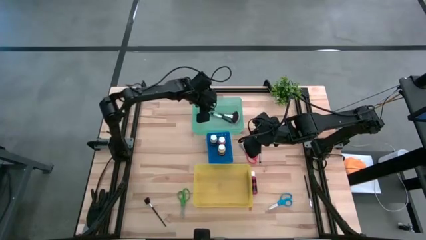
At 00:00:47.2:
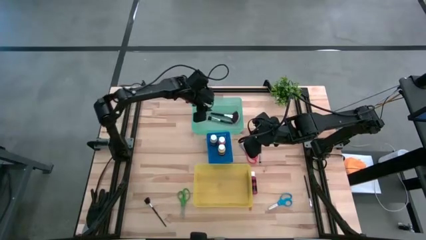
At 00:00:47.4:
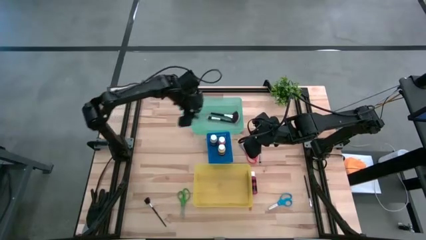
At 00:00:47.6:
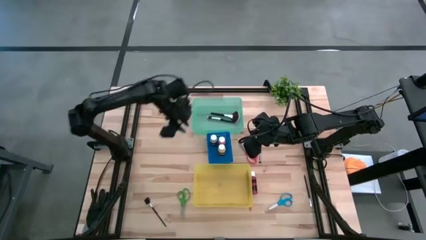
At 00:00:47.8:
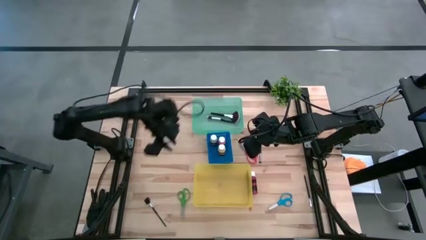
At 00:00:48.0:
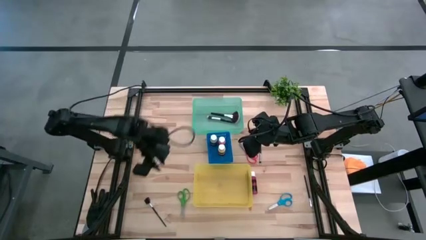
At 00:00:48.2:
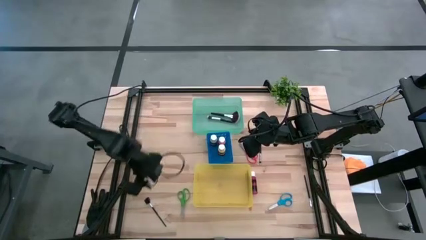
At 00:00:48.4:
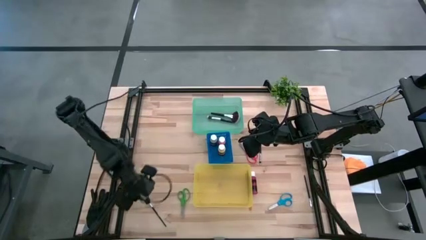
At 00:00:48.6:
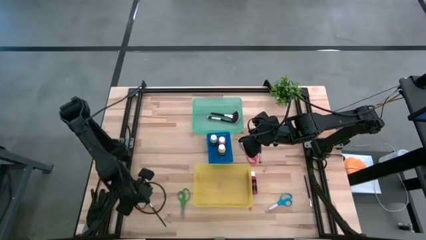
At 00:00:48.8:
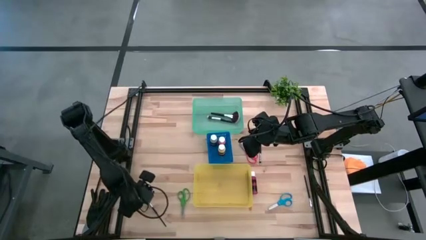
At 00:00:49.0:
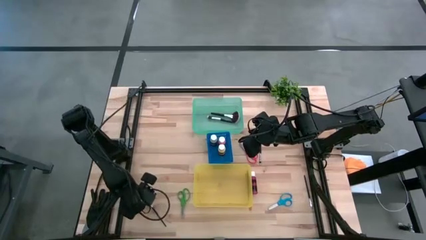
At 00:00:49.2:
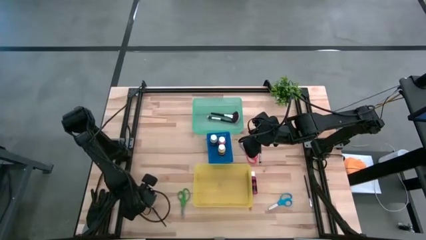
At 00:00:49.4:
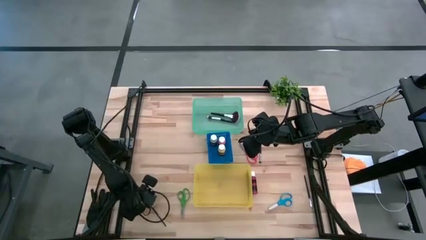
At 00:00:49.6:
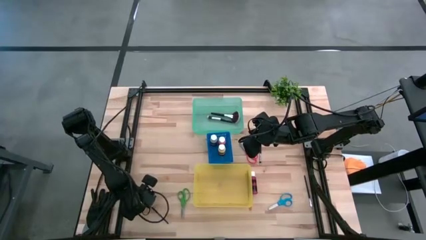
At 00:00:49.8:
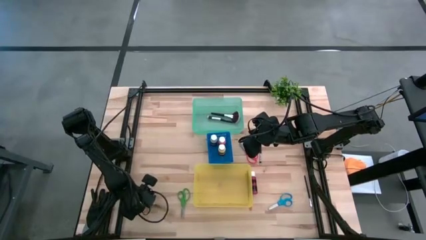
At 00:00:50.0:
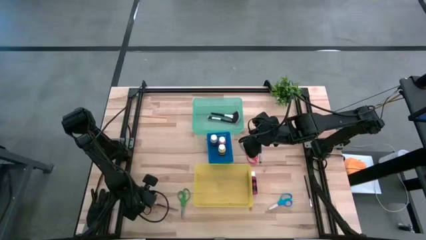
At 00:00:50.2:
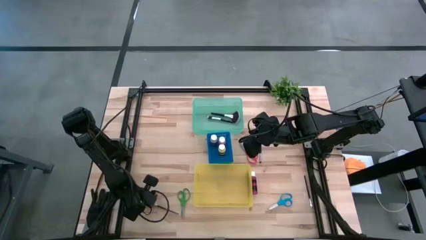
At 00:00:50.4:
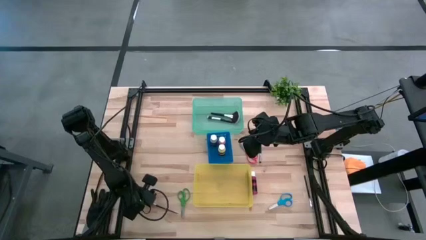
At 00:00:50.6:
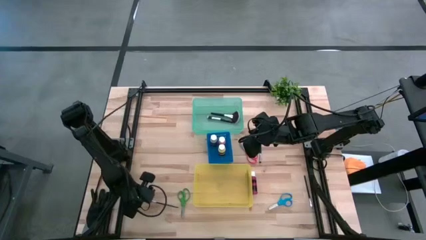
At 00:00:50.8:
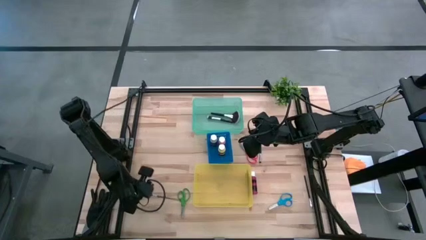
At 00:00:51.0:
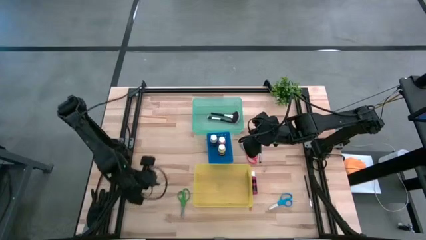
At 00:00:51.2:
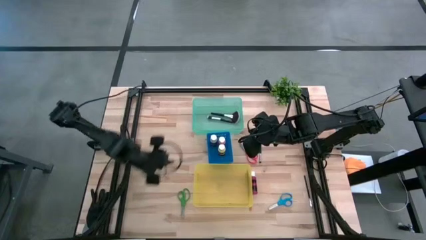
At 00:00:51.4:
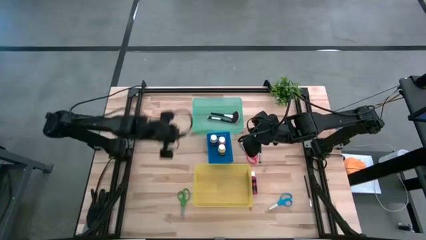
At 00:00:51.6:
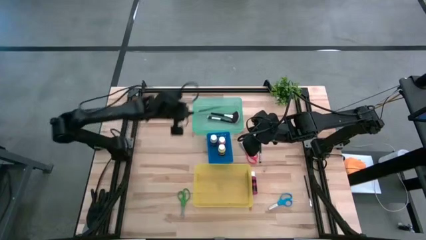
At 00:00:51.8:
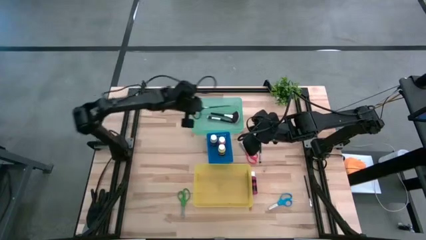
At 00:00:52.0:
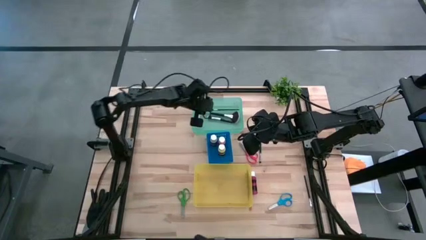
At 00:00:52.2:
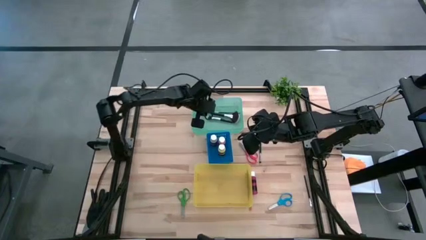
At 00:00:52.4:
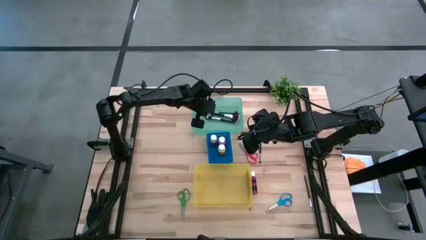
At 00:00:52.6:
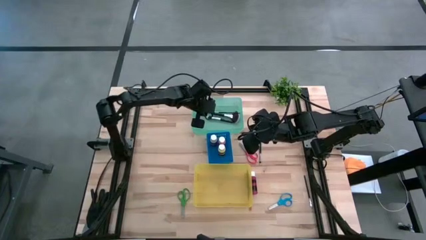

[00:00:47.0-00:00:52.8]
Task: Pick & Place Paint Supplies
Put the black lash brush into the green bin

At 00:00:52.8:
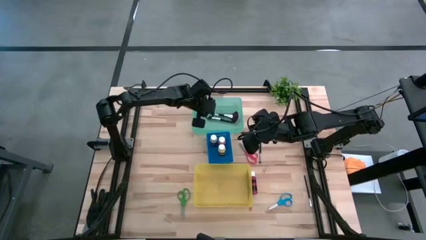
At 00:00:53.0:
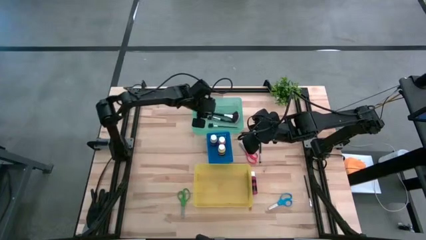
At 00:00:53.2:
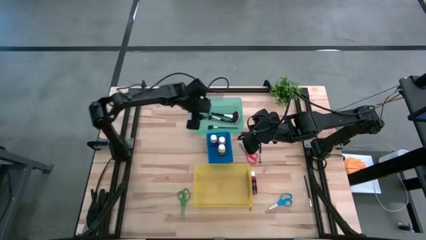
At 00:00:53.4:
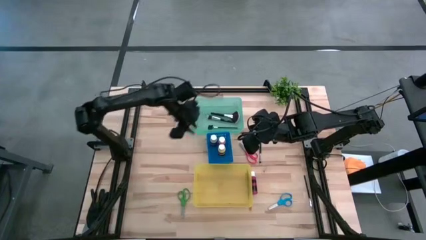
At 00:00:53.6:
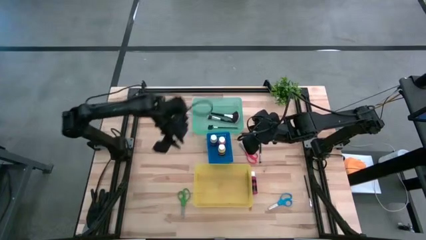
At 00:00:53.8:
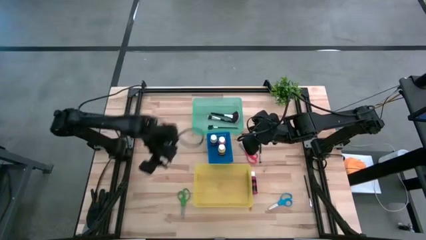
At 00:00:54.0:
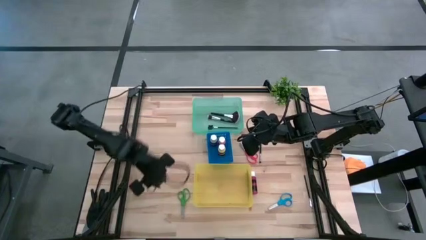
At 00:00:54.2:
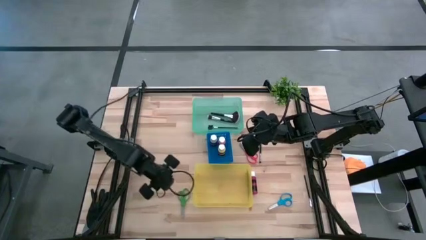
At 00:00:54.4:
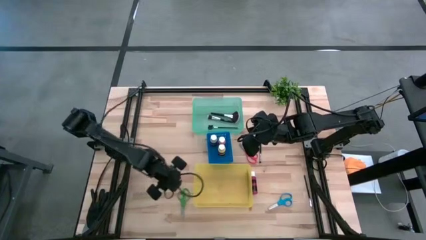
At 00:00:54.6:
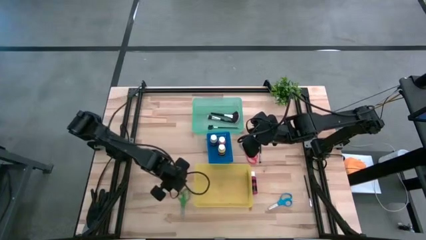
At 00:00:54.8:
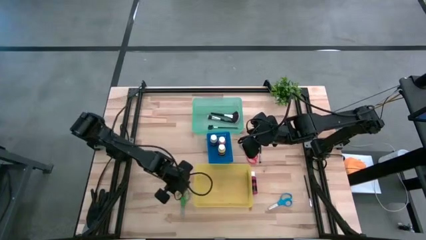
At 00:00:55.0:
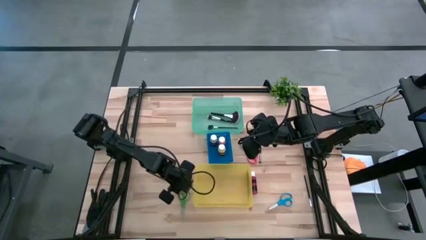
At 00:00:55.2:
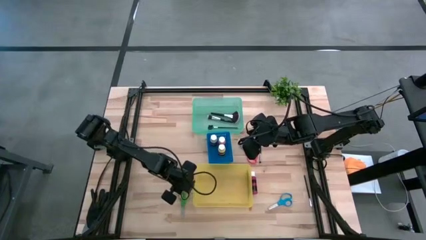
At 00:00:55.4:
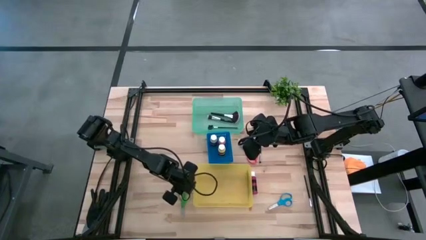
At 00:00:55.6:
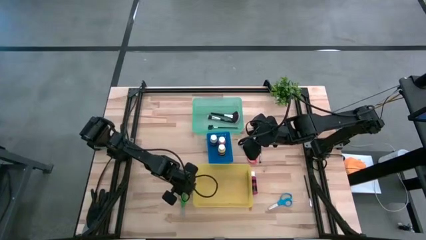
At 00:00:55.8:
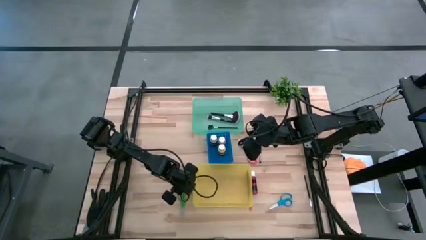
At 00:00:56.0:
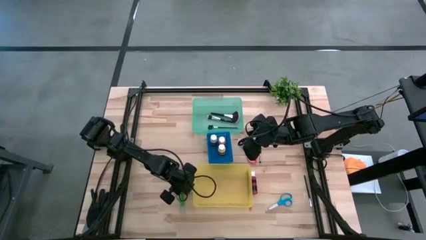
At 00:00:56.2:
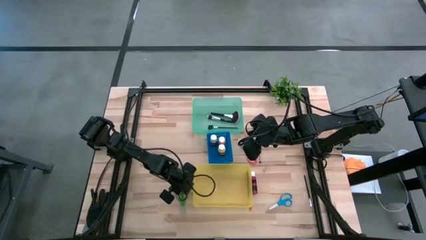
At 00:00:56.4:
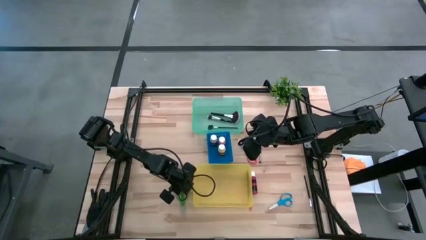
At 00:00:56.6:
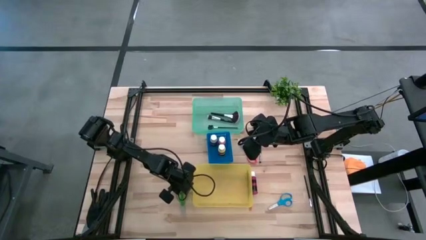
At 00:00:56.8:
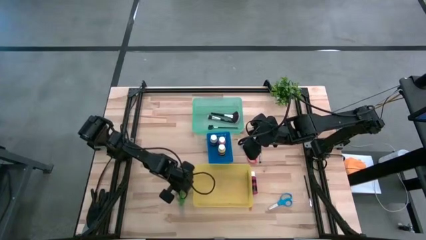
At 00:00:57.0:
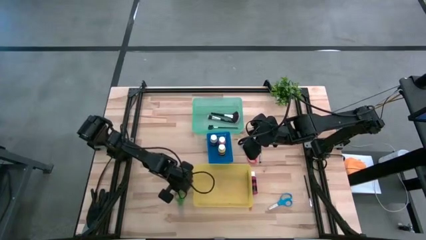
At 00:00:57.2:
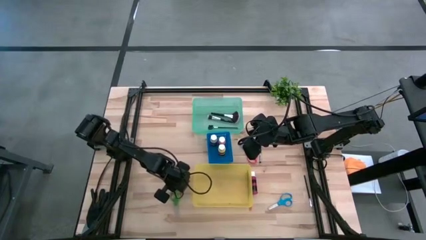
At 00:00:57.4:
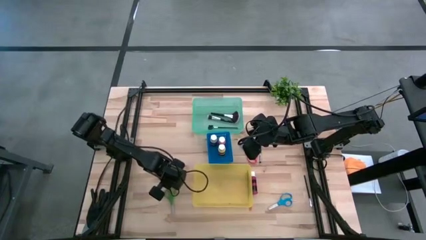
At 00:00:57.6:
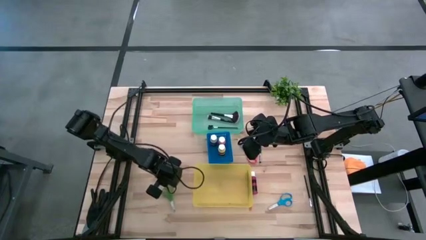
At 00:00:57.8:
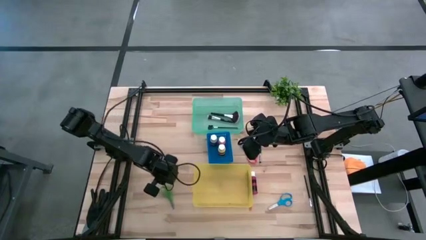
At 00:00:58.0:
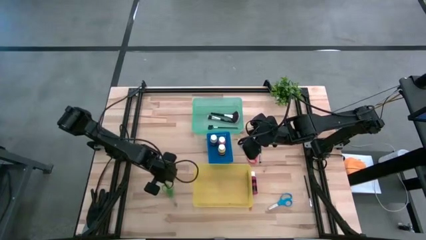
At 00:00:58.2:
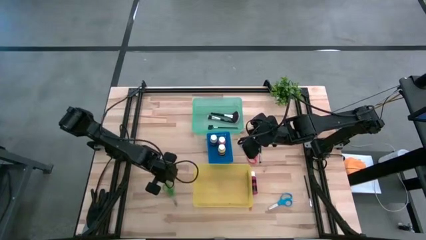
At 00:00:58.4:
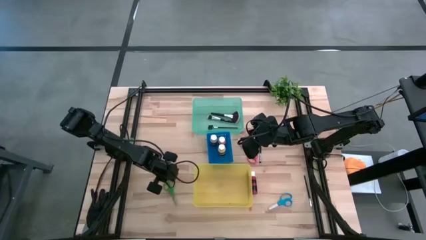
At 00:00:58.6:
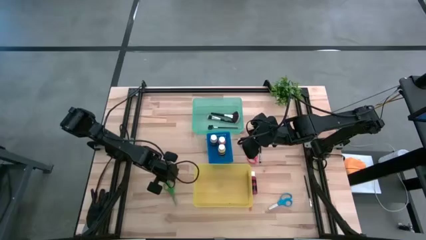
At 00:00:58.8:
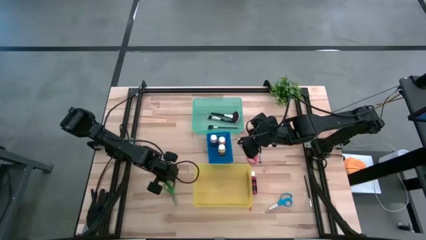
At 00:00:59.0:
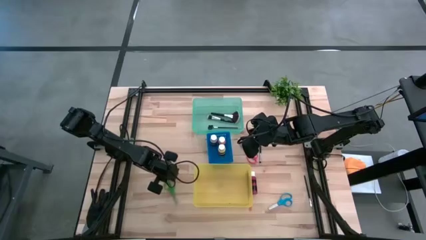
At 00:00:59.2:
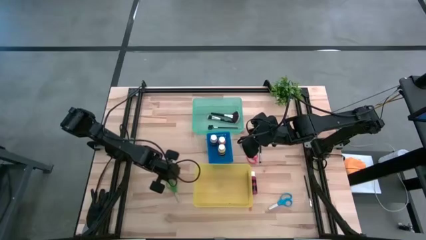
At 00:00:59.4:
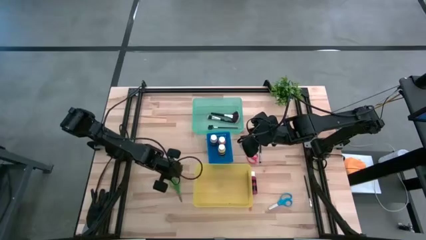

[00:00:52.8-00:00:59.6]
Put the green scissors into the yellow bin

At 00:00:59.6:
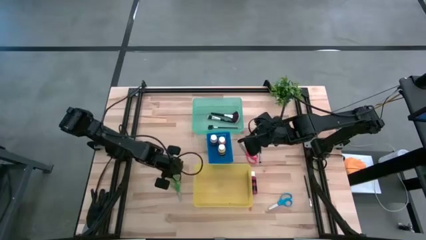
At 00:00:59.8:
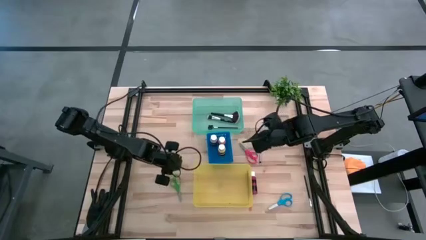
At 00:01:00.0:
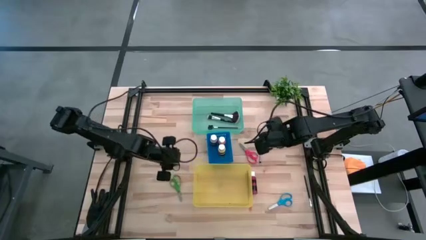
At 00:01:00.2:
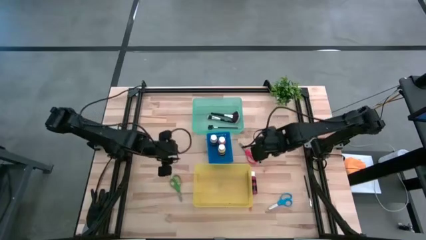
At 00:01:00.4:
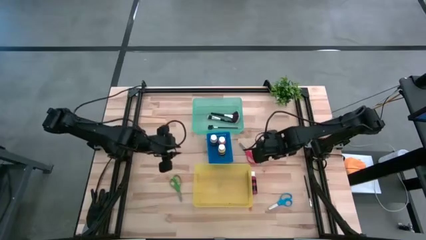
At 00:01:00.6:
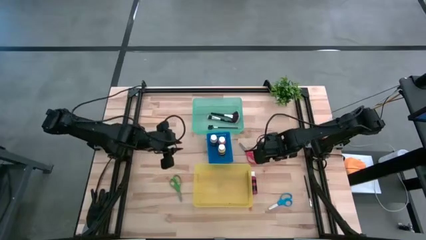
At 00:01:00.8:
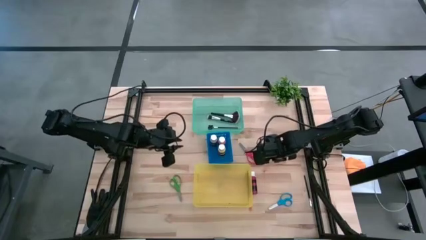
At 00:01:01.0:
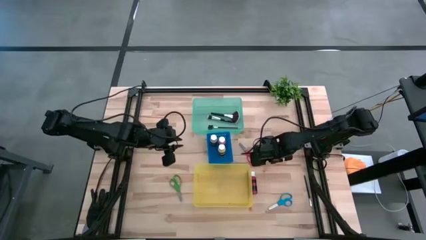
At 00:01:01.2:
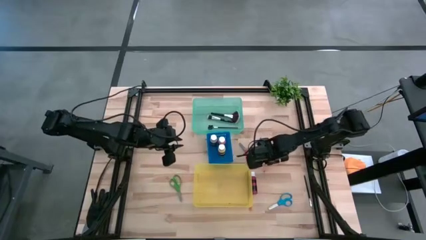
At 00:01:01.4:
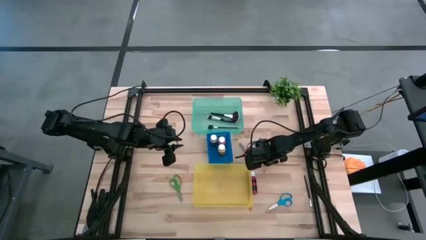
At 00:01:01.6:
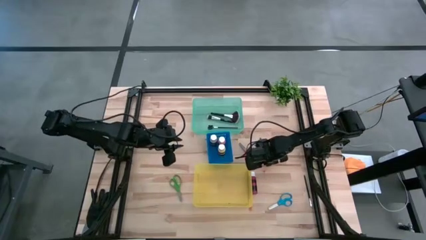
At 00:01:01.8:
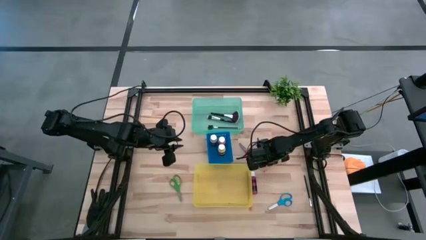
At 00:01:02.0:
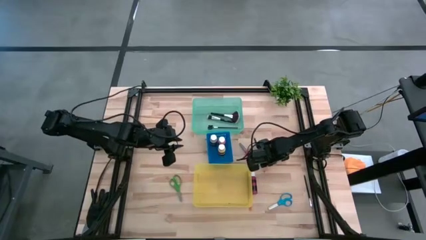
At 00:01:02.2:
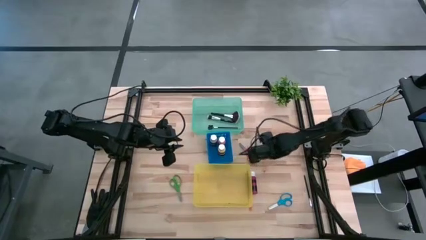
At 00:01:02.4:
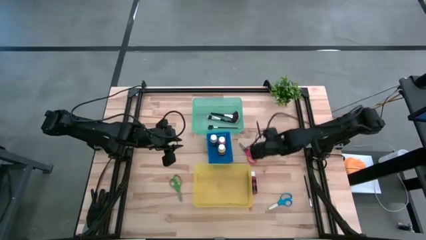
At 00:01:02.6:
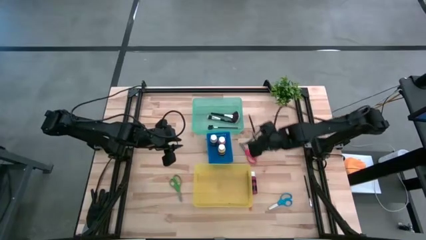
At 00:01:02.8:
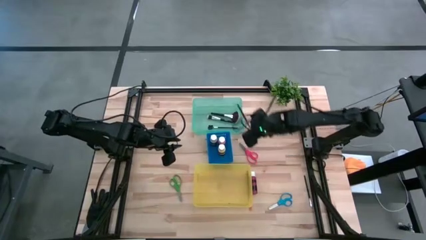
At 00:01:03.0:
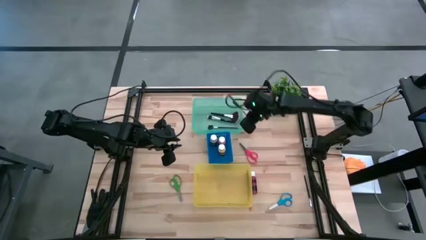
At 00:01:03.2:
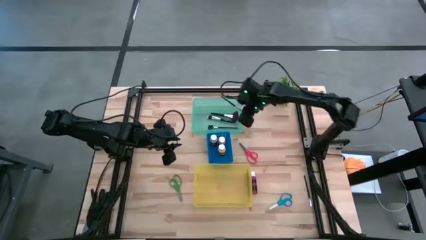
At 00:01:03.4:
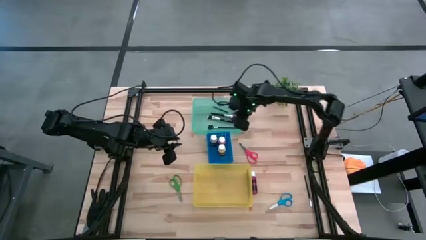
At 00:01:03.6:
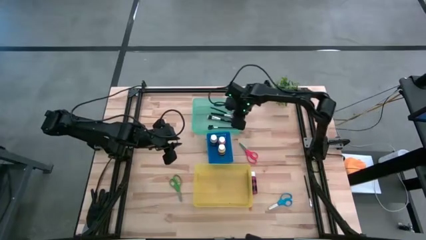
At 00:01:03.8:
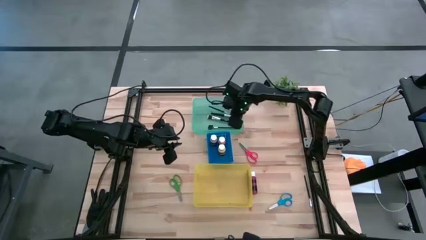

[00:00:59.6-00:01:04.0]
Put the black eyeshadow brush into the green bin
